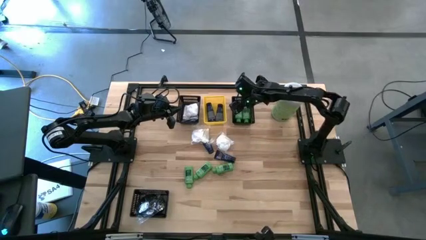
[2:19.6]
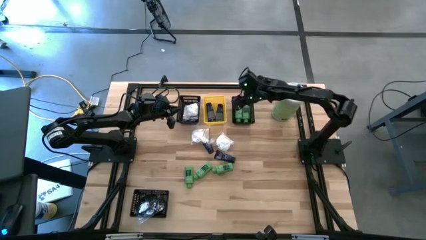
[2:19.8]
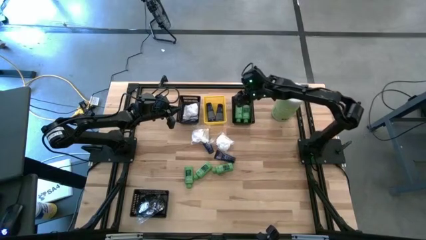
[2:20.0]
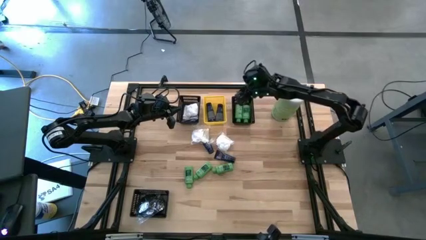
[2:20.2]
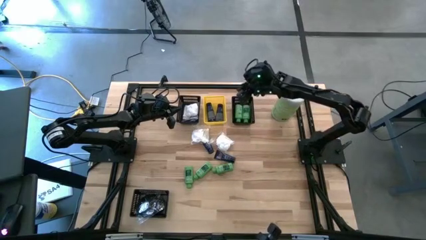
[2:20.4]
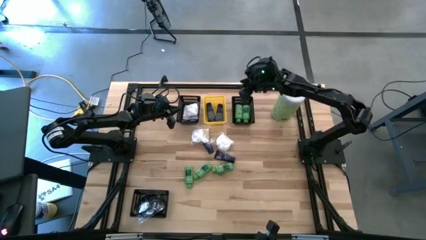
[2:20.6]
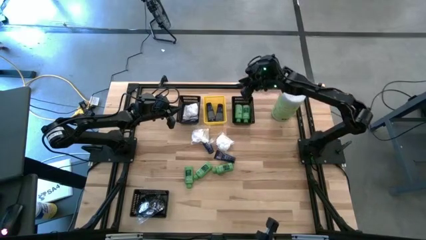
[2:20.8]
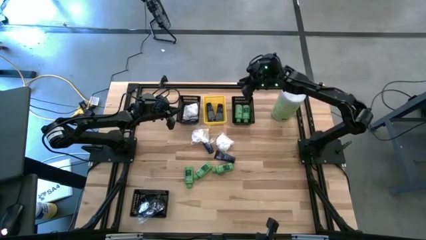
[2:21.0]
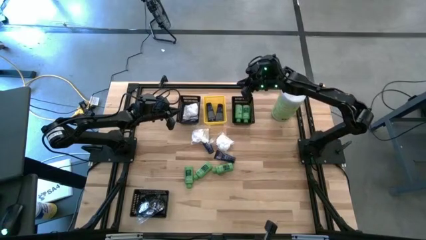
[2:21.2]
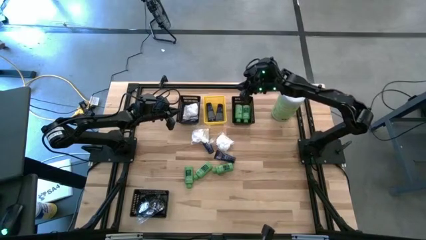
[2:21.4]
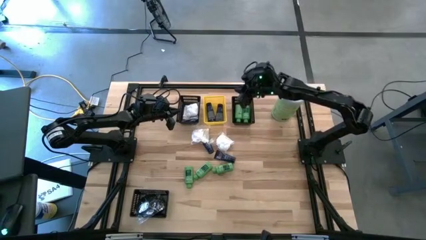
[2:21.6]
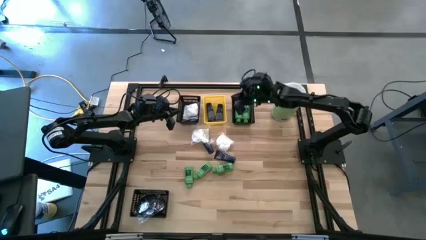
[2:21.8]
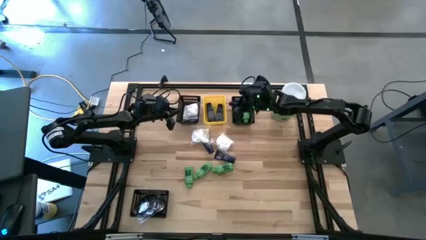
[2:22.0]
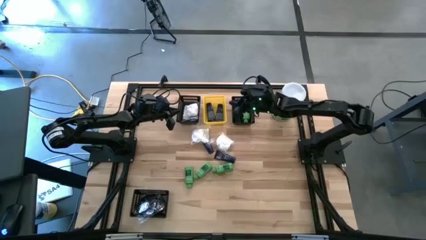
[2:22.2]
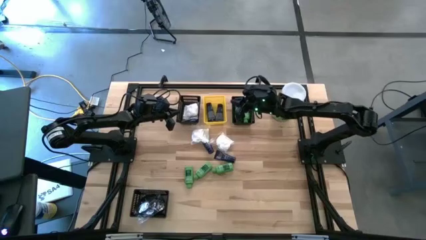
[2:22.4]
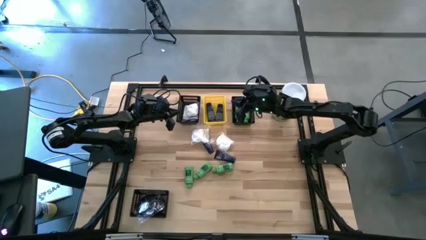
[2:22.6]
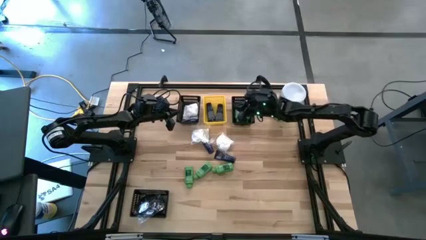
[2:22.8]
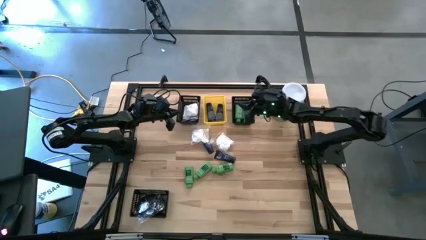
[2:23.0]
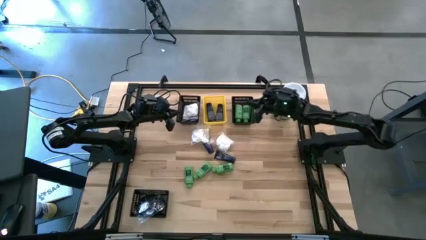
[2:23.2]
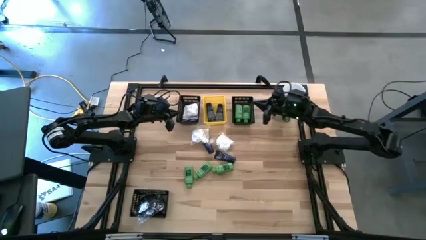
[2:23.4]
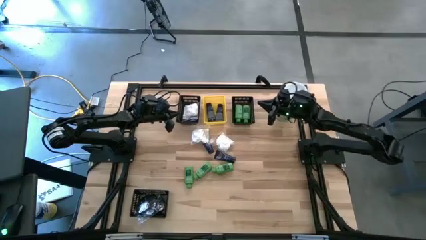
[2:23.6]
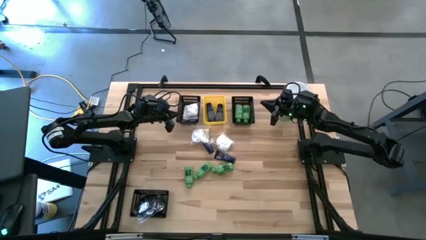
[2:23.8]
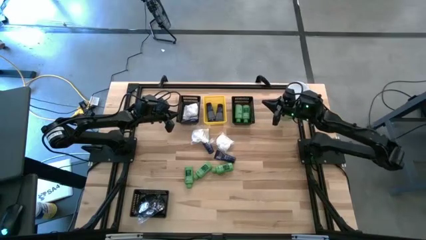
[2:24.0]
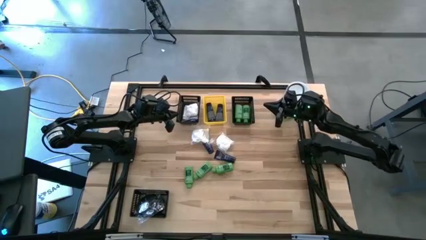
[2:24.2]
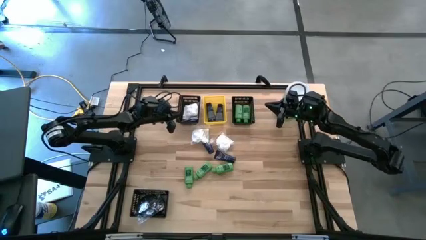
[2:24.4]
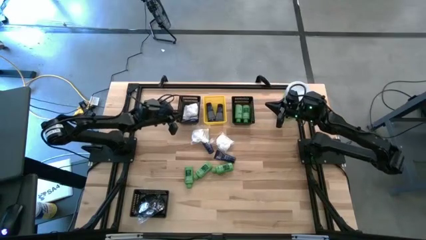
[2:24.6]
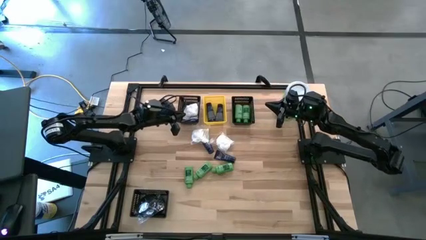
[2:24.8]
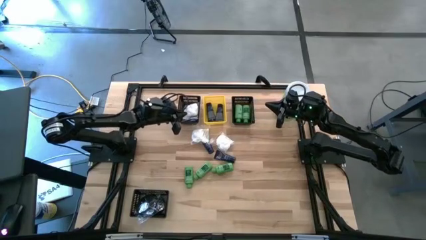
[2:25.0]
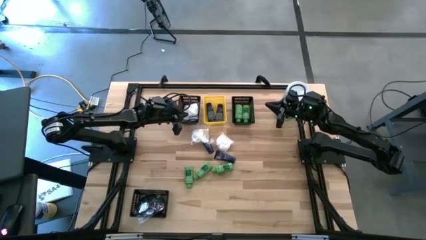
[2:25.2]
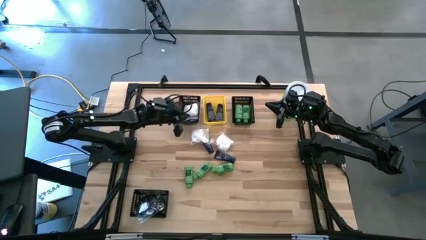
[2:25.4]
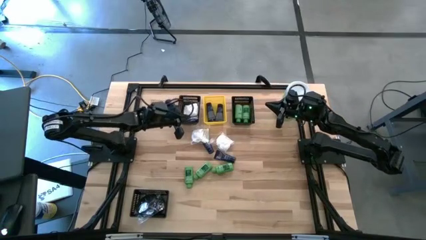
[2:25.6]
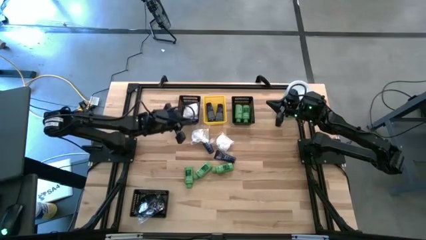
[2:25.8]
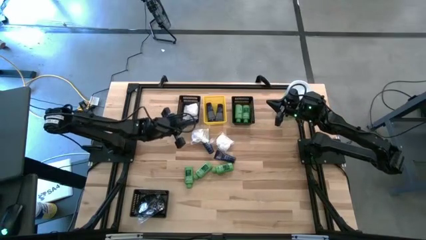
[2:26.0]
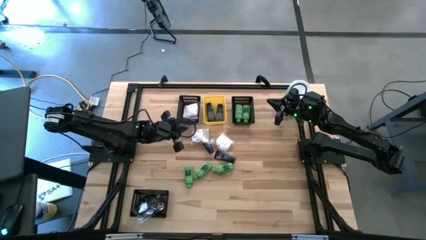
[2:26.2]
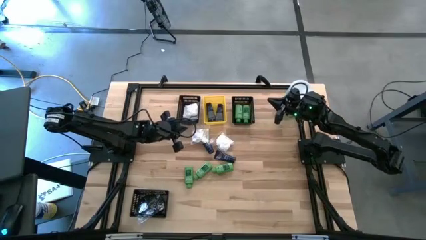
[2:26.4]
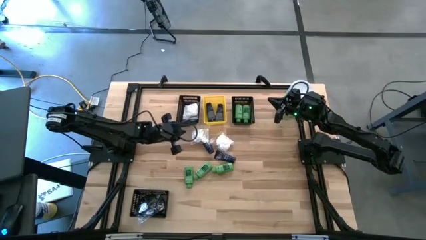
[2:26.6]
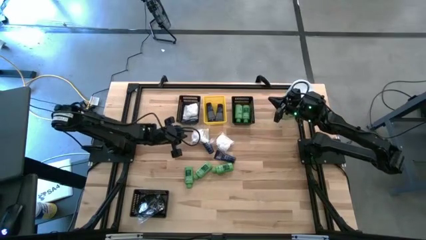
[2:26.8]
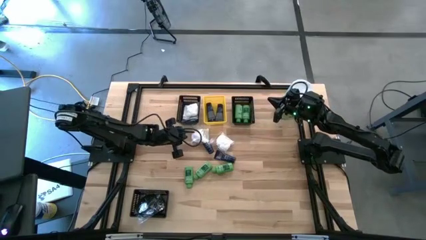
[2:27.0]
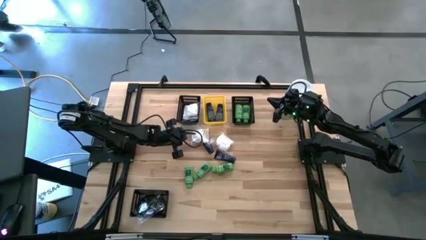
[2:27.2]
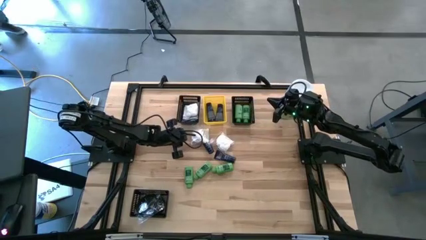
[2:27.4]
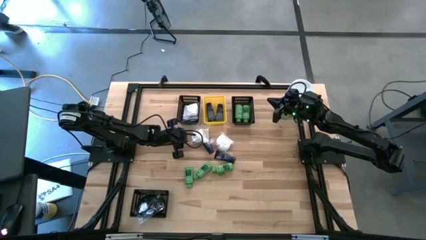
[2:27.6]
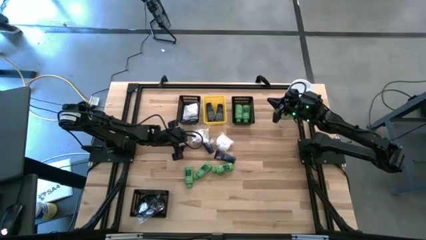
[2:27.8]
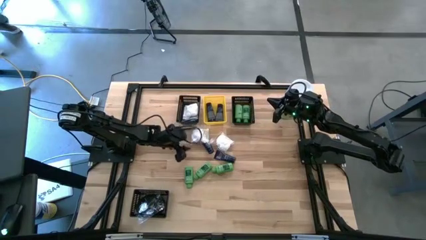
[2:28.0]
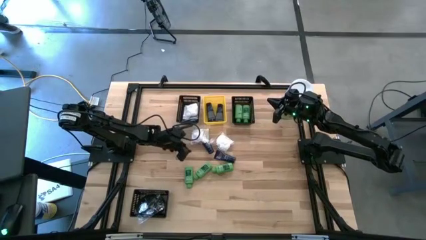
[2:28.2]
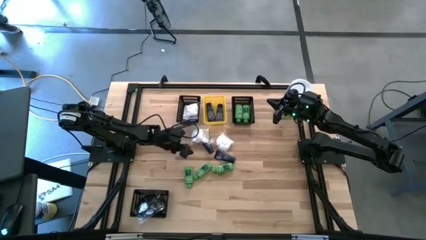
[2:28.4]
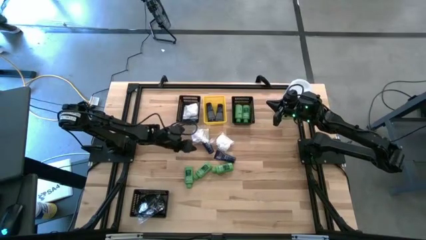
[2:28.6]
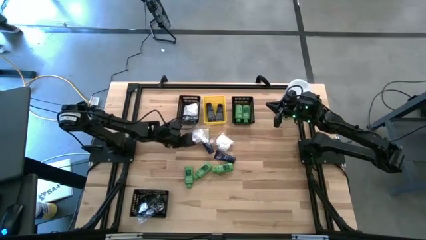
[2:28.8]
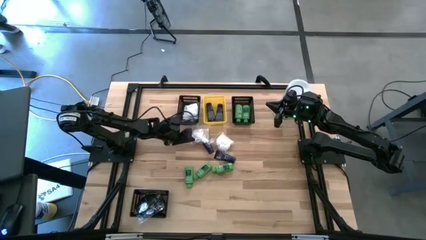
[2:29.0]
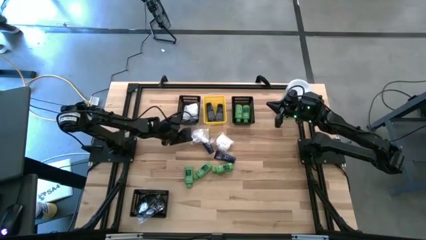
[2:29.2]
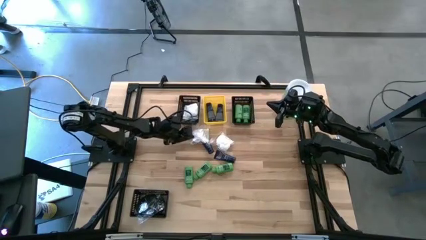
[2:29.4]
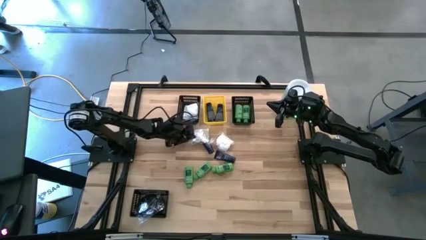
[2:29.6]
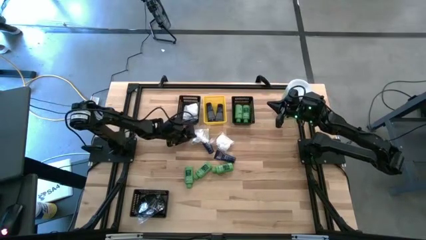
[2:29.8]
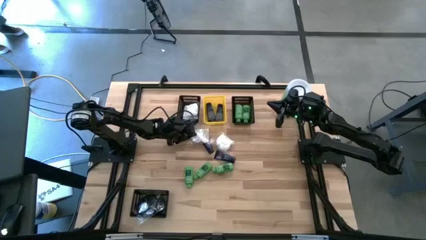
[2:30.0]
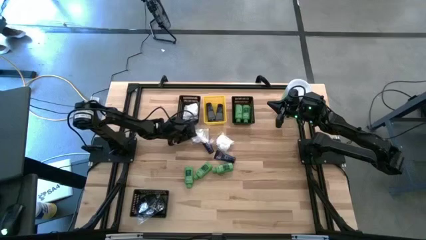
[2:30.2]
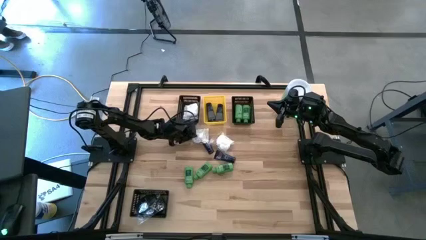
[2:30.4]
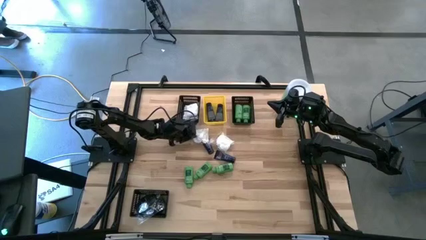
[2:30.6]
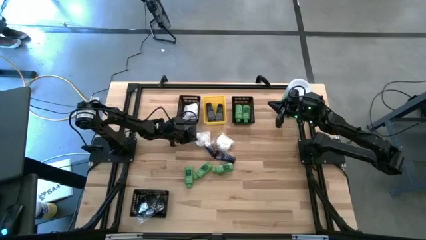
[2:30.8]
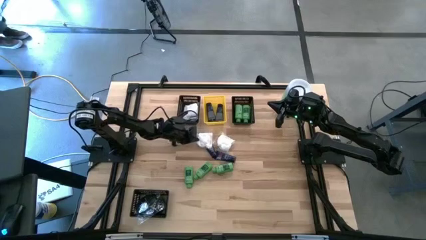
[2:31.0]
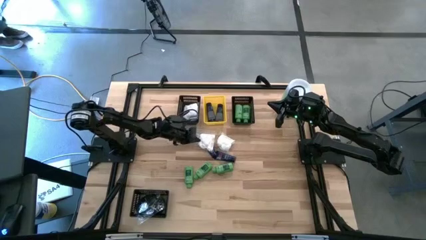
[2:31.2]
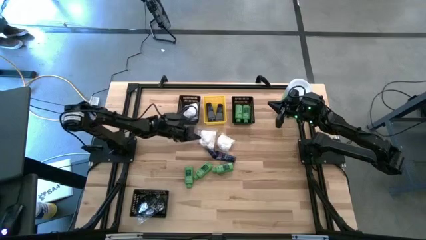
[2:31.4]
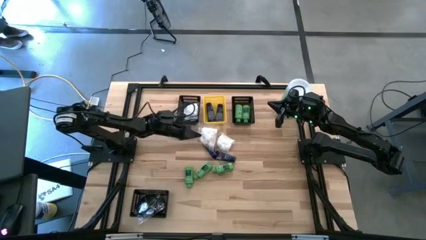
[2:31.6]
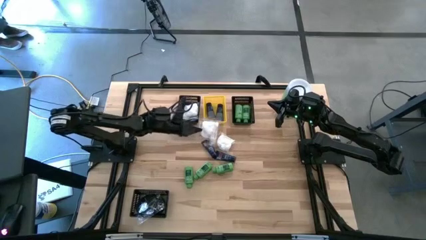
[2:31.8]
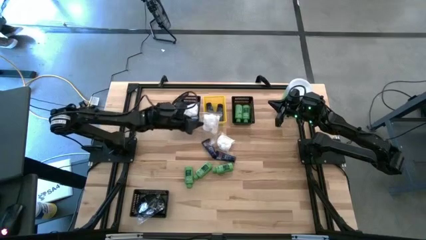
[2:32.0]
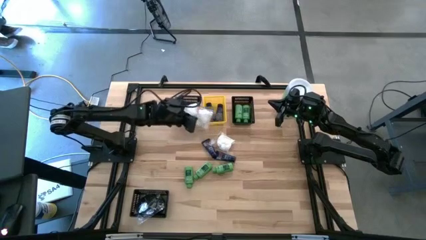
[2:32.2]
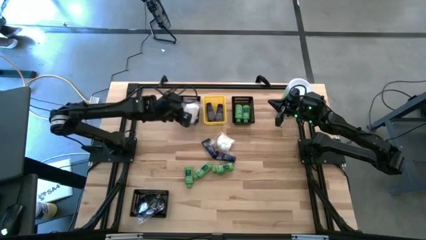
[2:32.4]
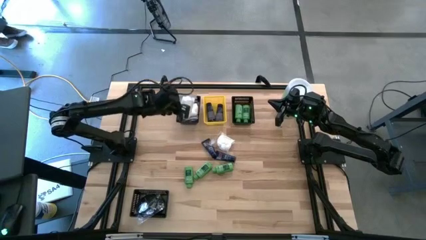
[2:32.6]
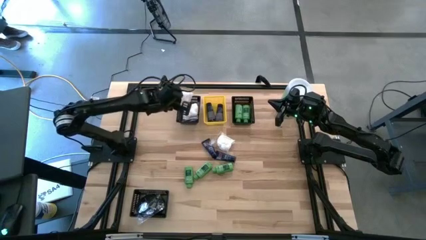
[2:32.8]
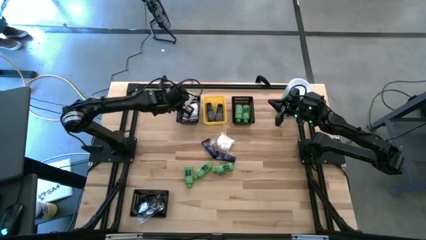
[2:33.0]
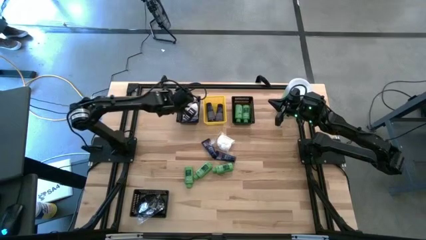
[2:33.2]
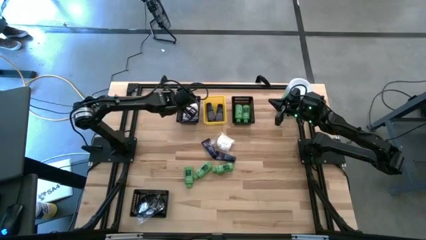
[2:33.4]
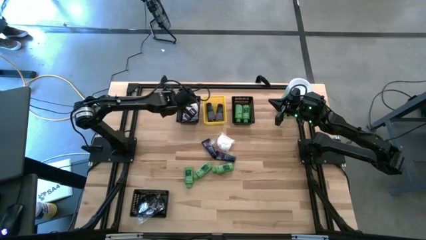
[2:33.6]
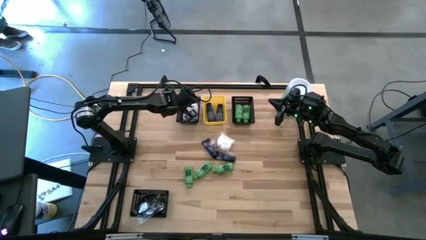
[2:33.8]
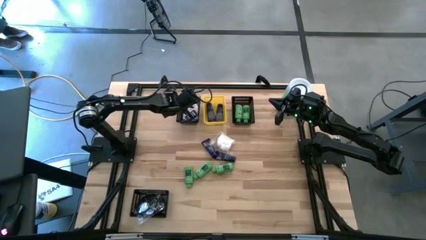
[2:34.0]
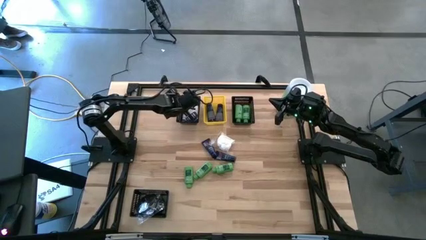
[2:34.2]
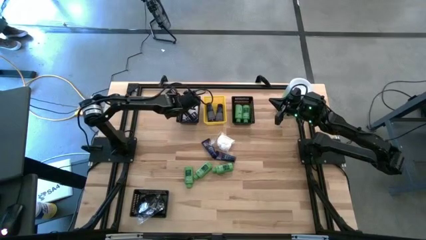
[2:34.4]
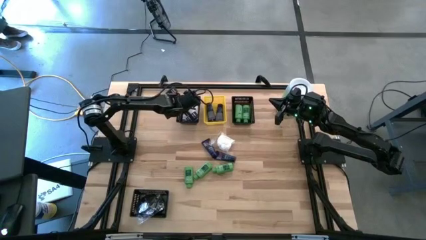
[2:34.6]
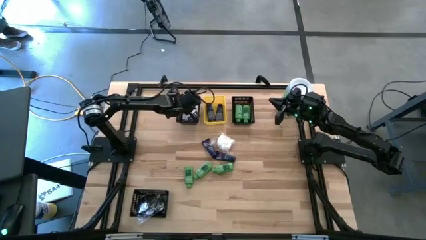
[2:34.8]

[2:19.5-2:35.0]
Task: Pick & Place Travel size toiletries
Put the cotton pack into the top left black bin
